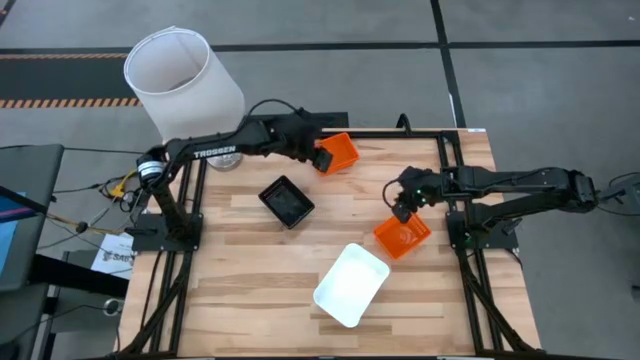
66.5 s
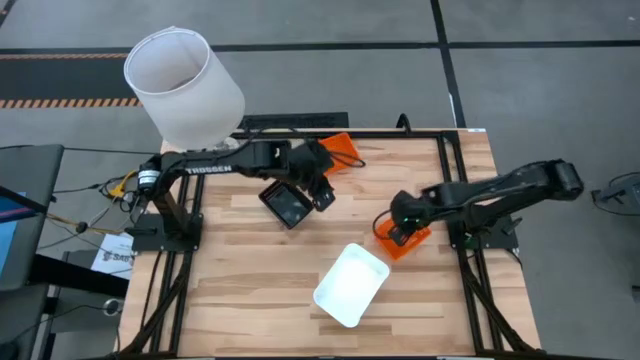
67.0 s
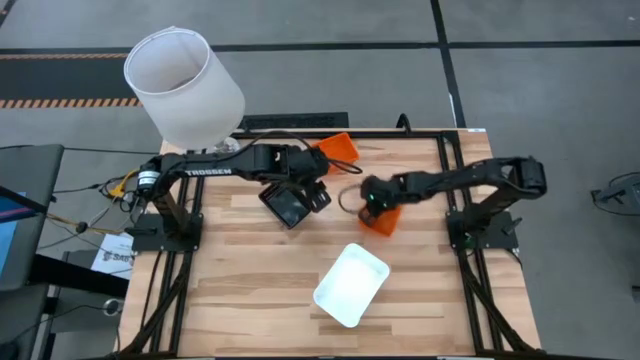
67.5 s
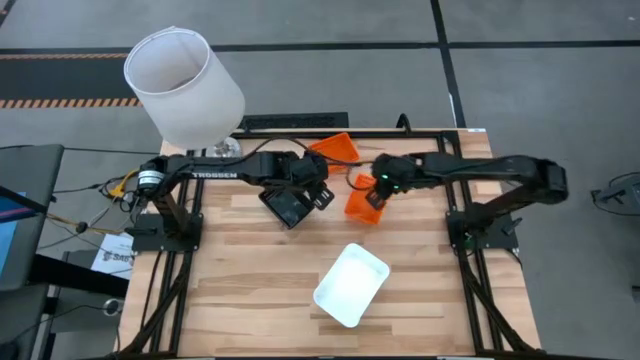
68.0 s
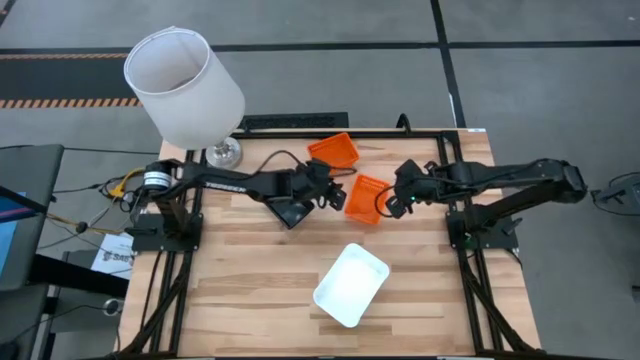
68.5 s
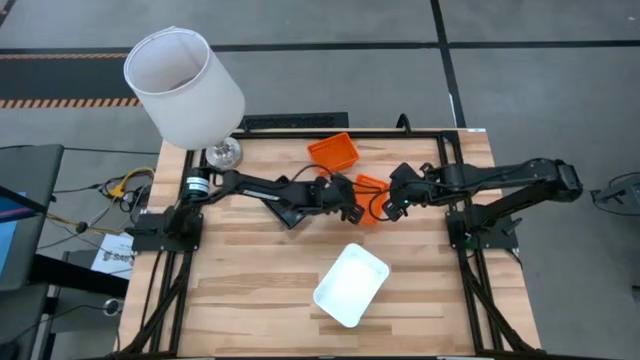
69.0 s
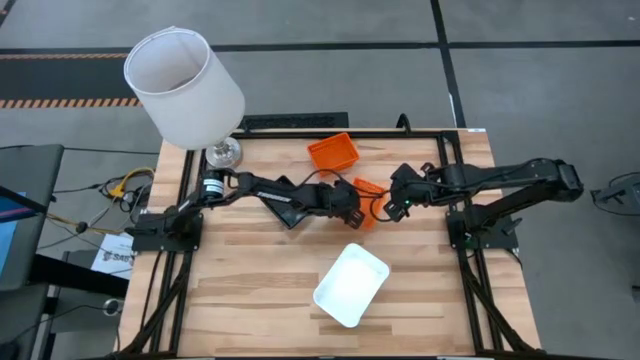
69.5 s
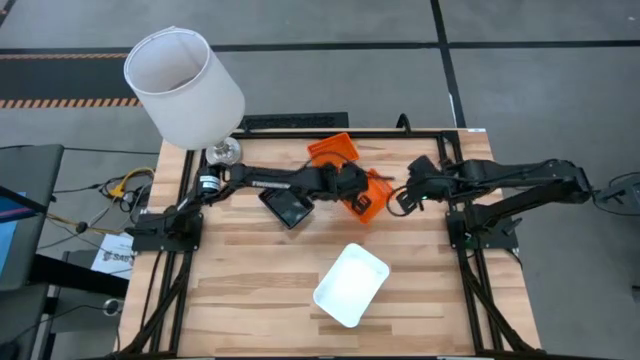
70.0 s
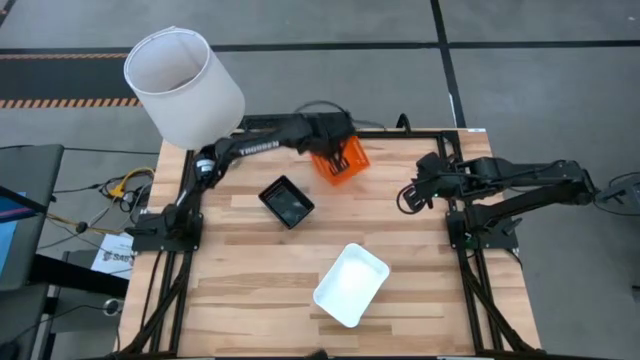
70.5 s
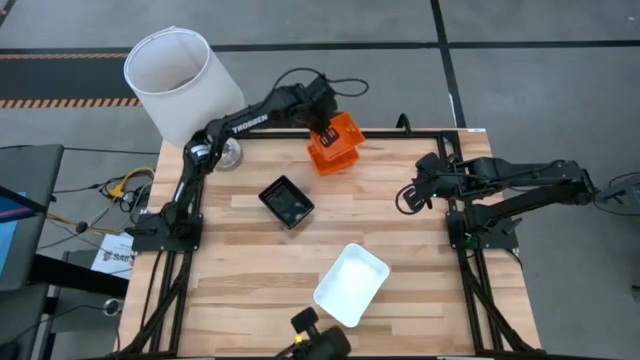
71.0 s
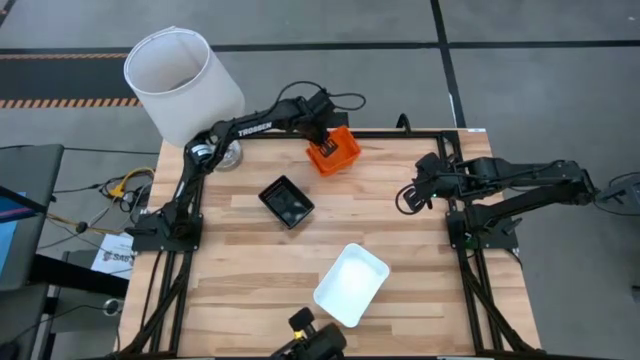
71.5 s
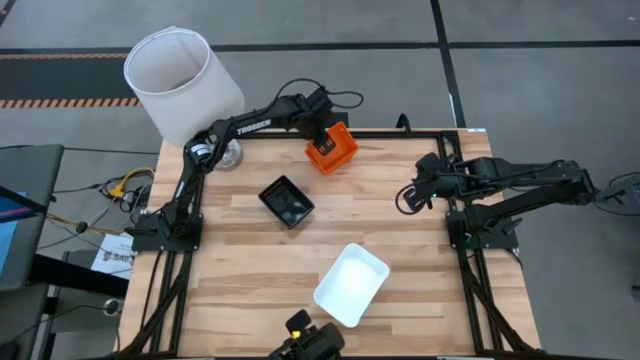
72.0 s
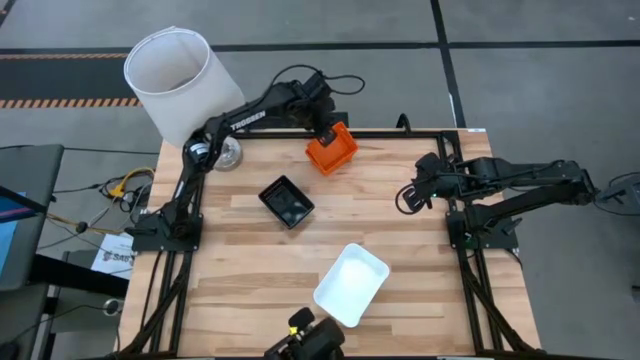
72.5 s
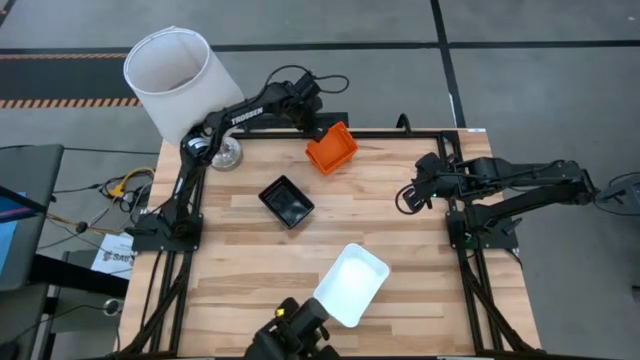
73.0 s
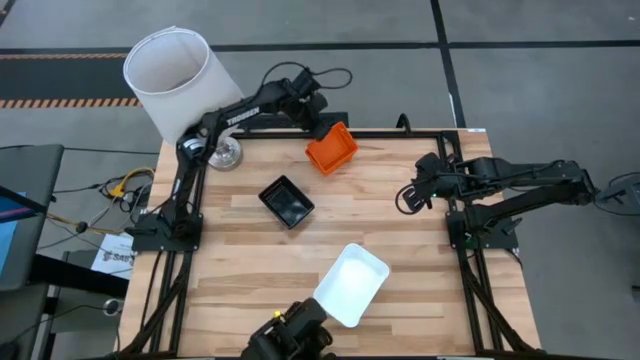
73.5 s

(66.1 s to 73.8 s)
Stack the bottom orange bin on the orange bins

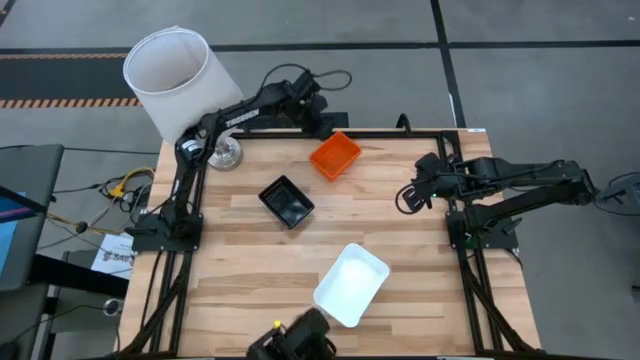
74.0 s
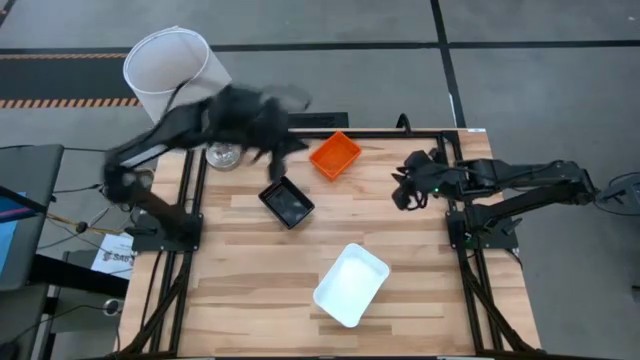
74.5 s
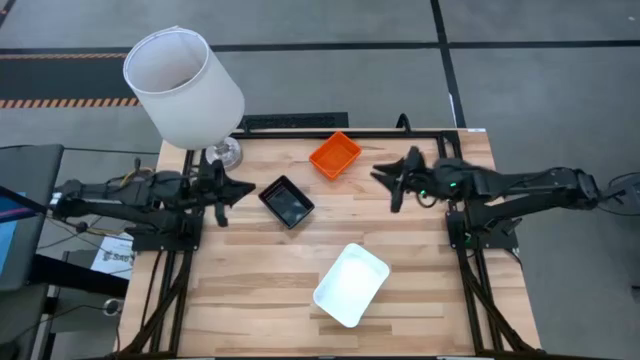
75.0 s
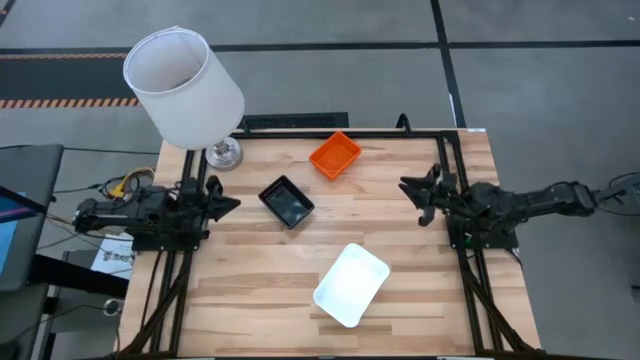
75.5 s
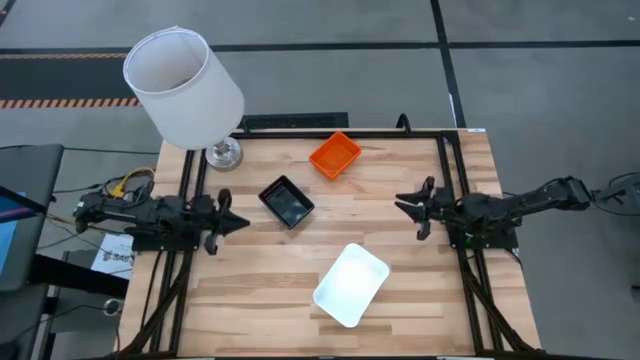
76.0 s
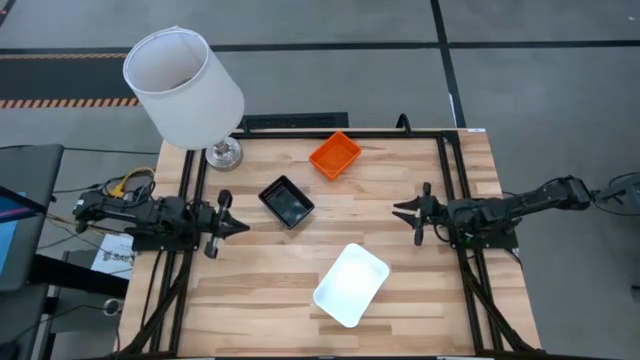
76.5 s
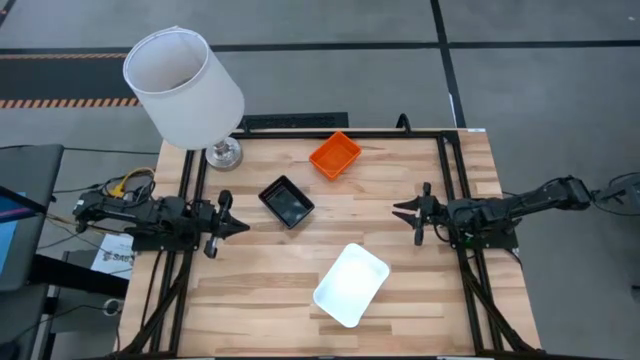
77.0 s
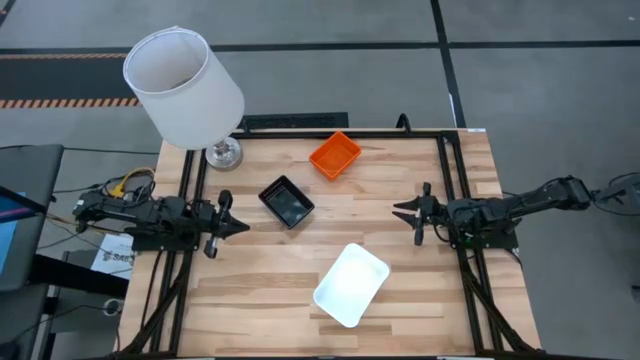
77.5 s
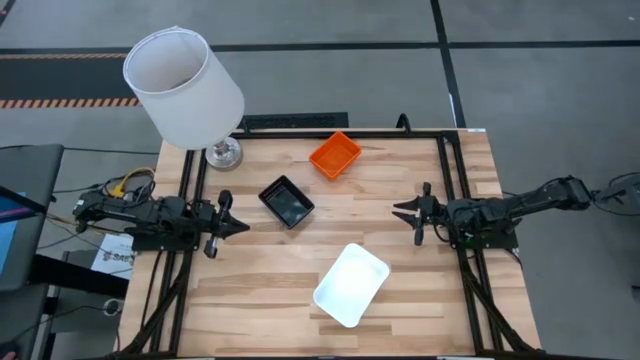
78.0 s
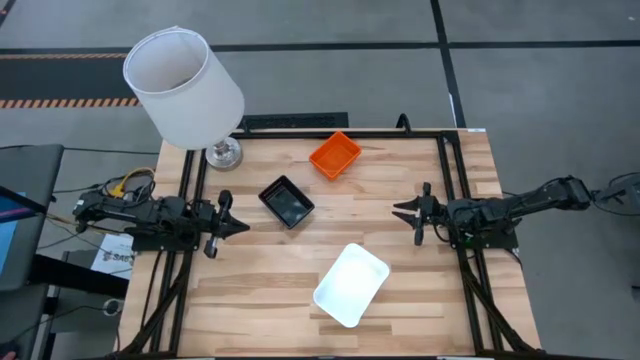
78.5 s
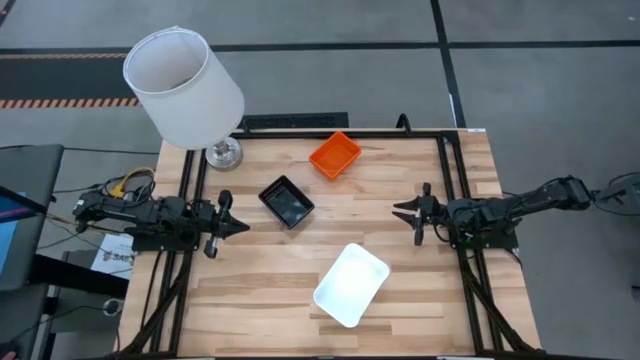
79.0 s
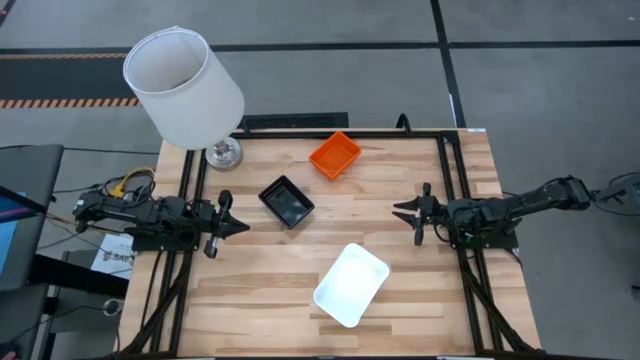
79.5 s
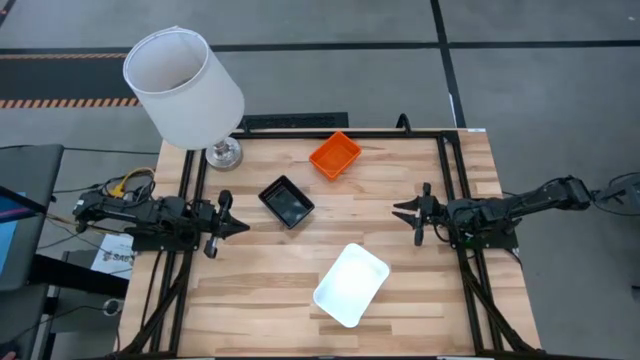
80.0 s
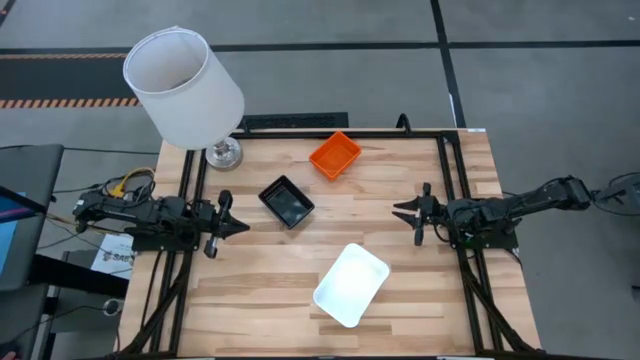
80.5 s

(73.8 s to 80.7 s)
Return to Home Position

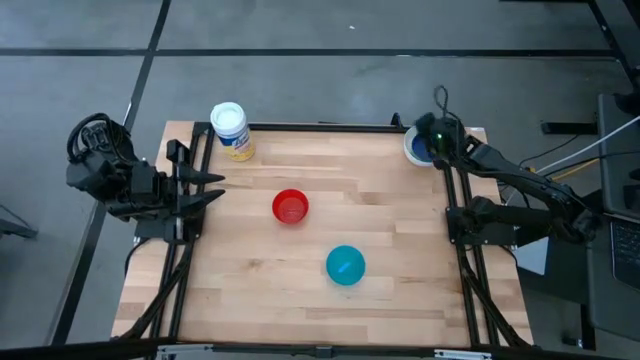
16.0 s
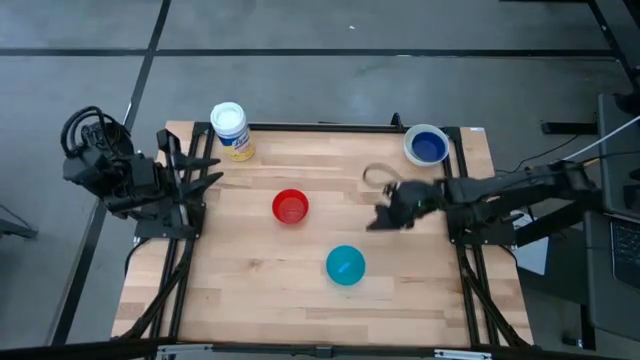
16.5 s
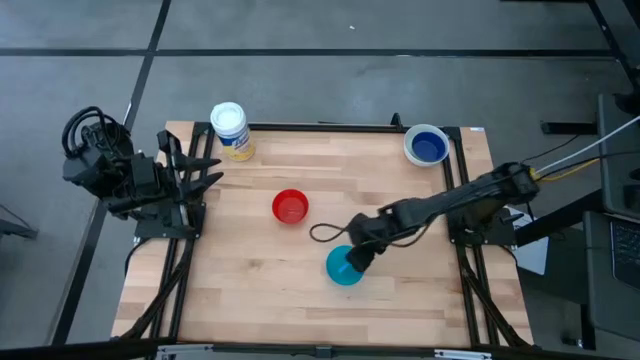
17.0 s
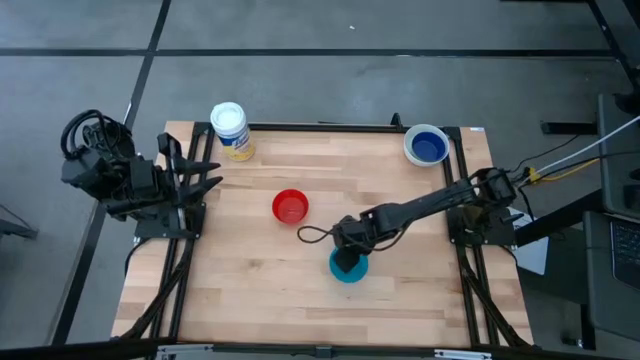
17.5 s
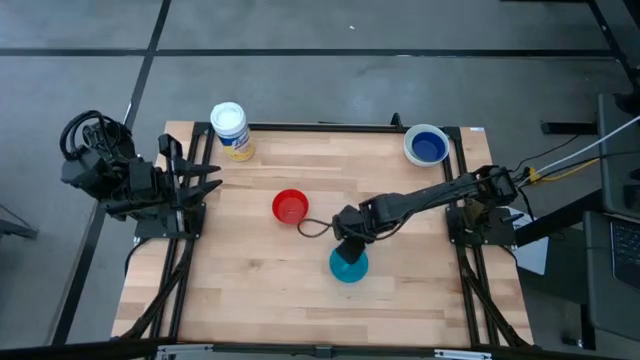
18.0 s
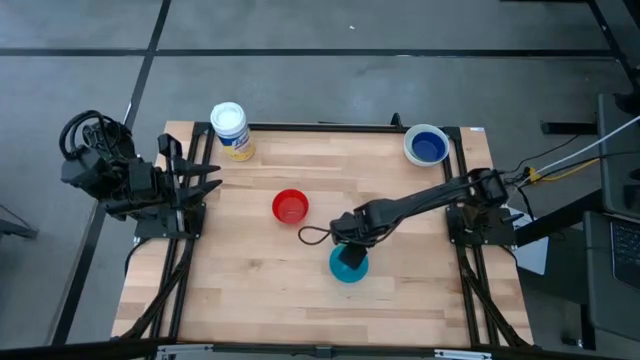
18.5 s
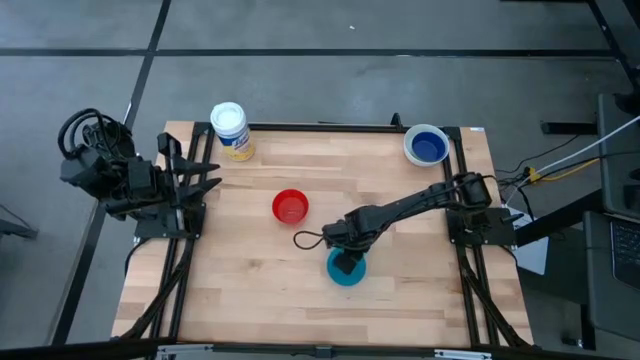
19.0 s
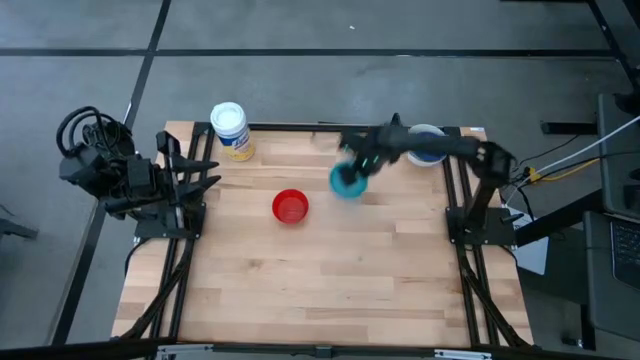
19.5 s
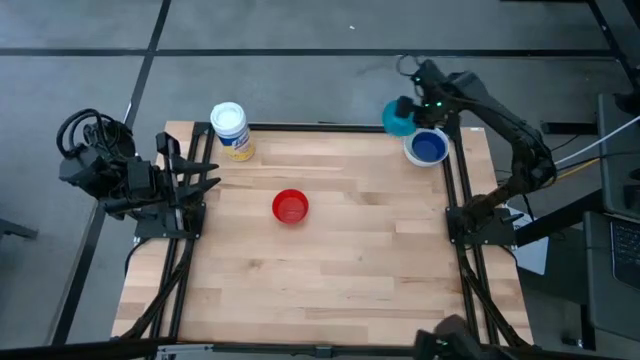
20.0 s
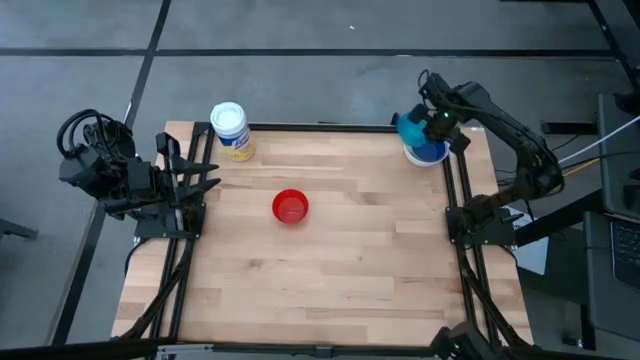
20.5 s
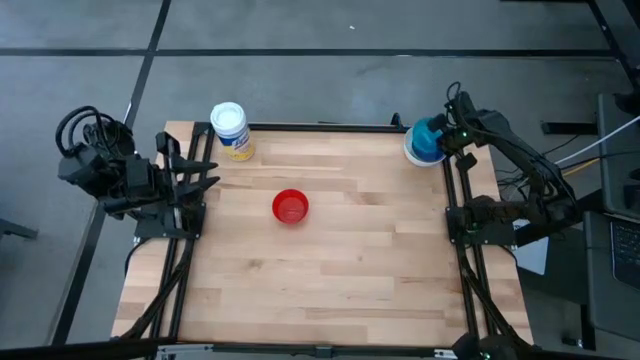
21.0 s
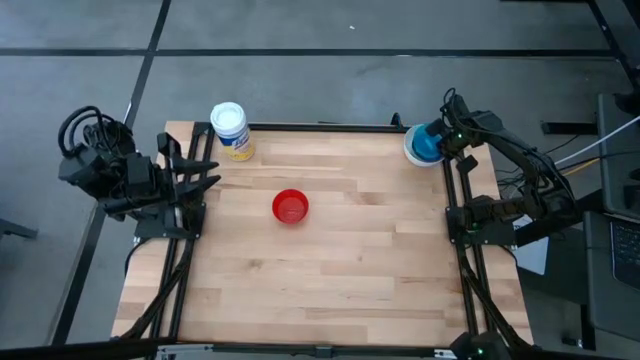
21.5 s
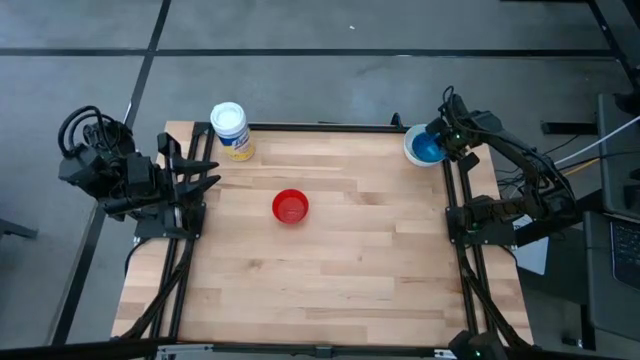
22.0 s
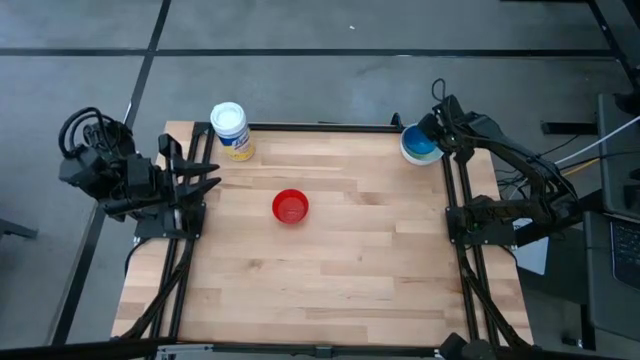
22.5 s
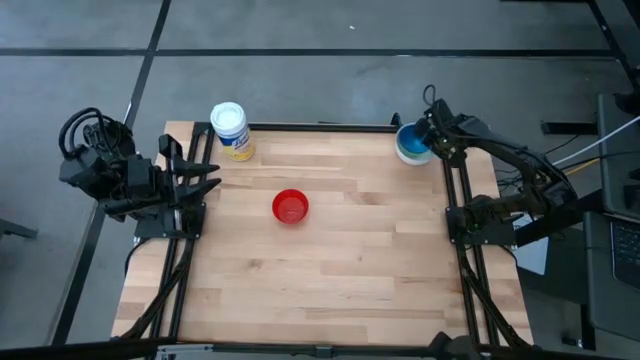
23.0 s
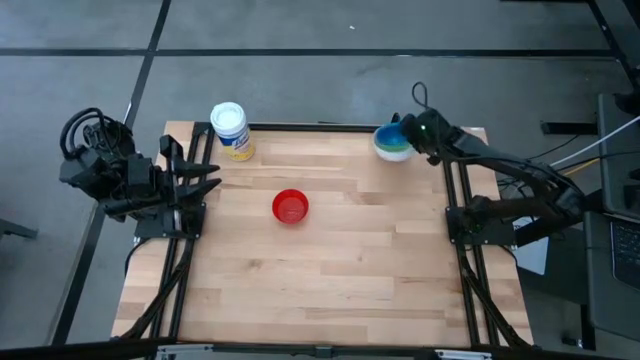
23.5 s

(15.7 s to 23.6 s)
Stack the light blue bowl on top of the dark blue bowl
